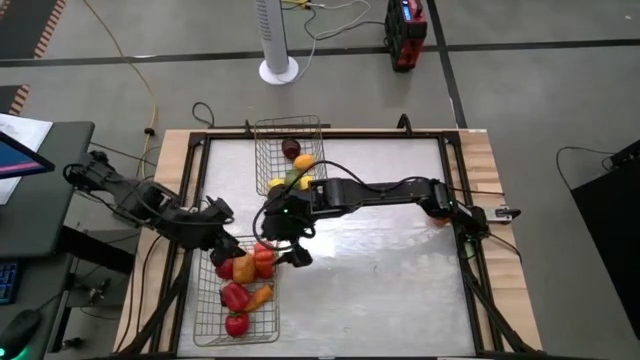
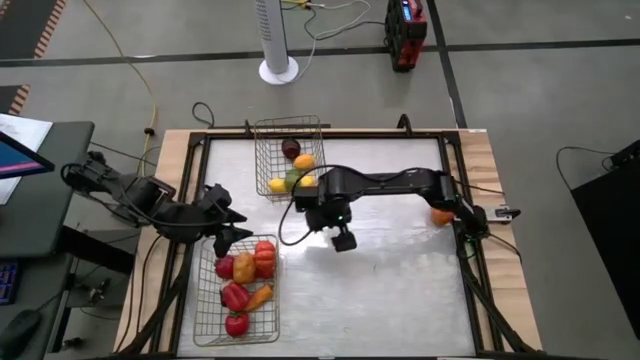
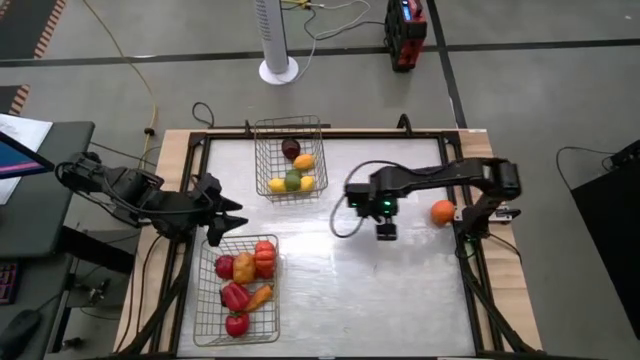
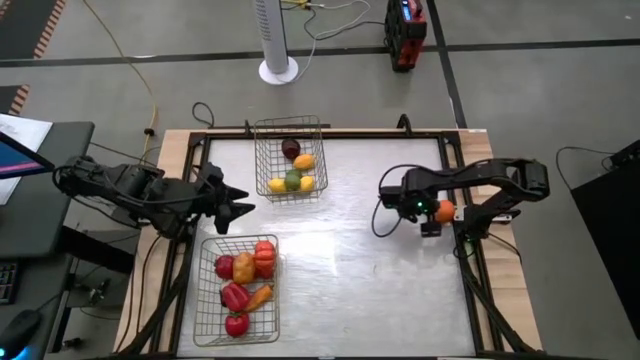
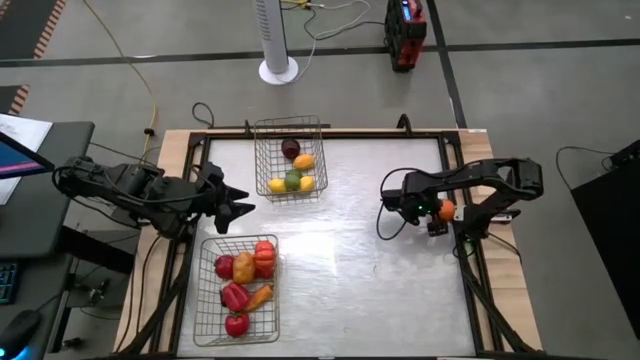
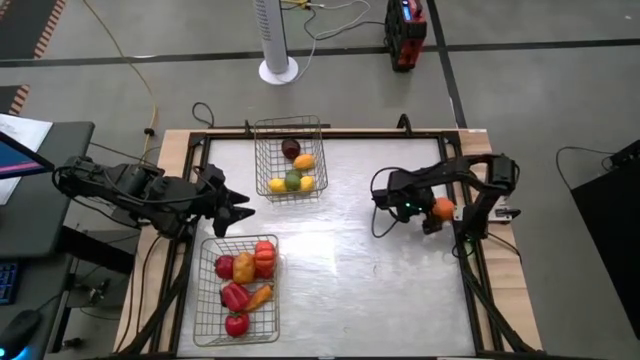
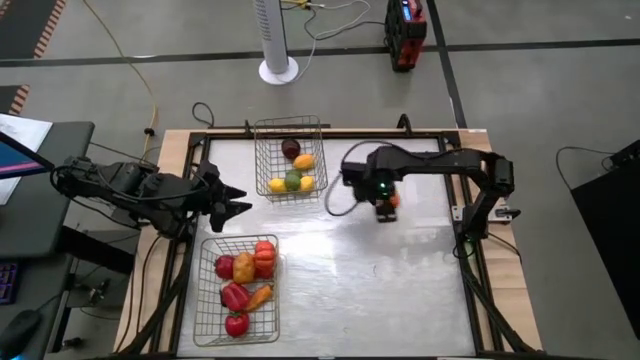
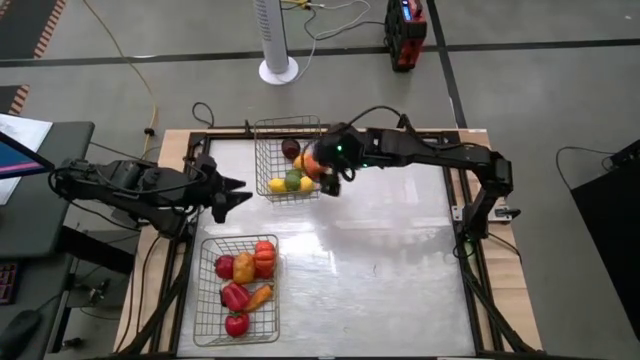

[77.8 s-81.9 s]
Task: Sort produce into baskets
Put the orange into the top wire basket

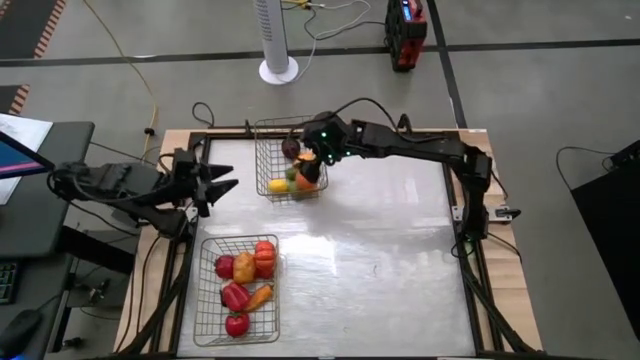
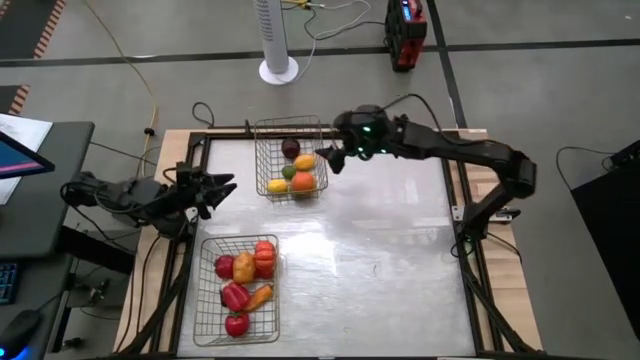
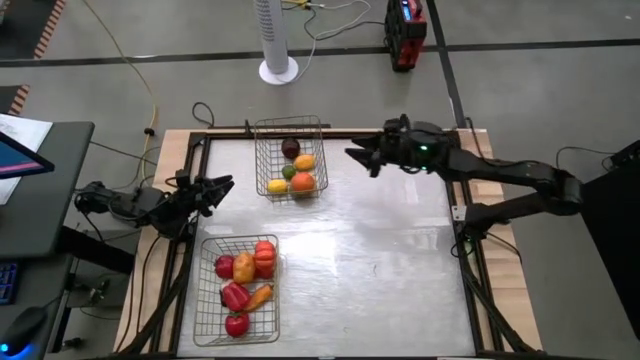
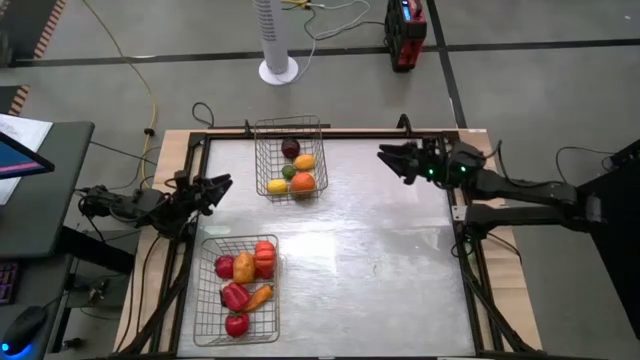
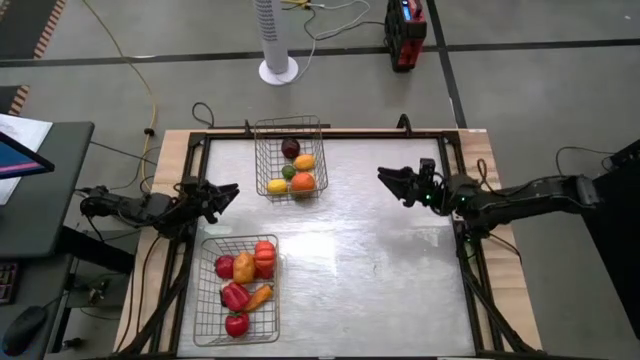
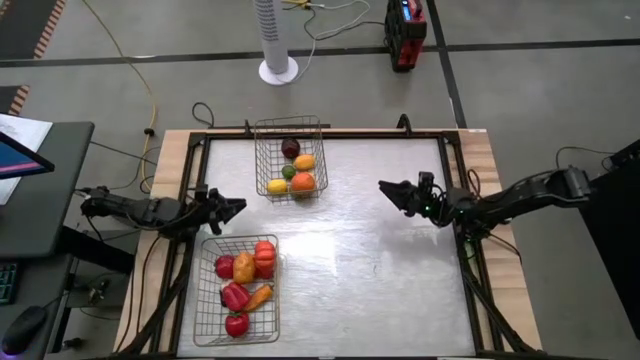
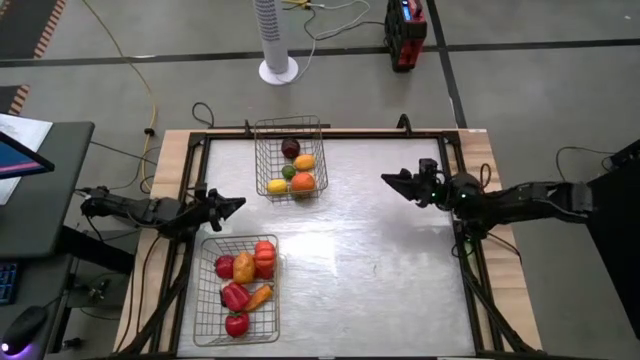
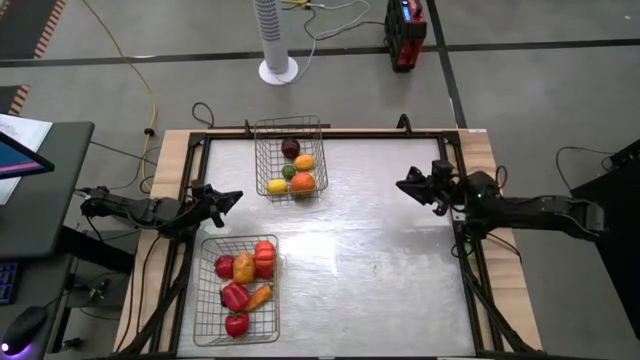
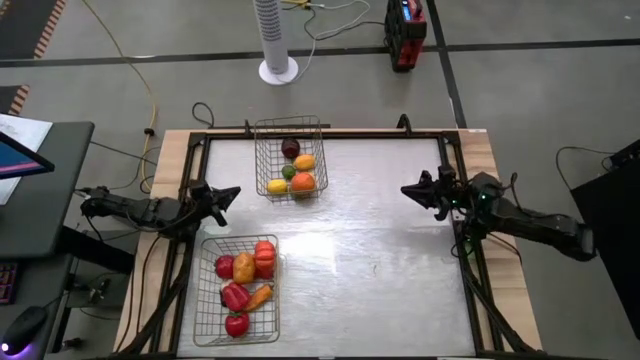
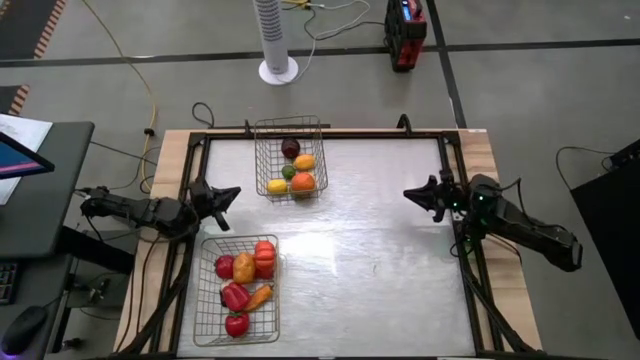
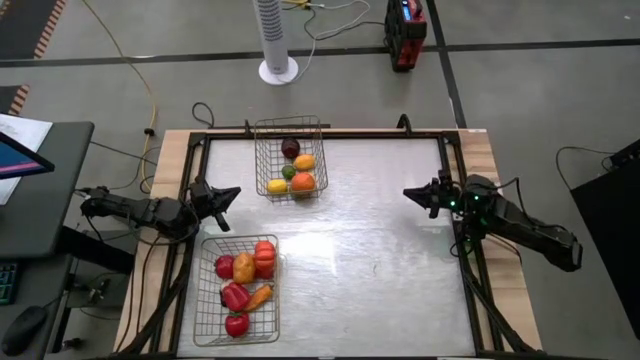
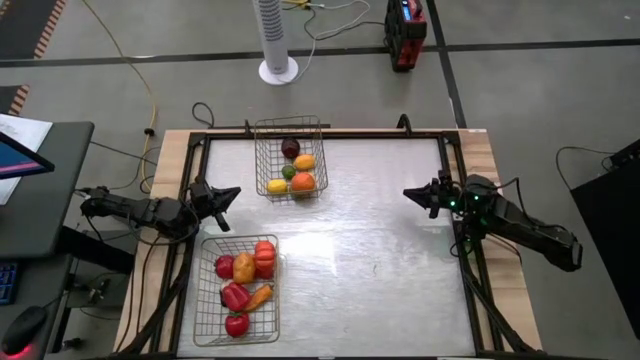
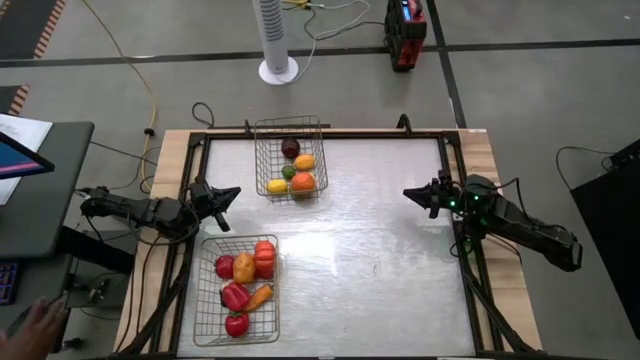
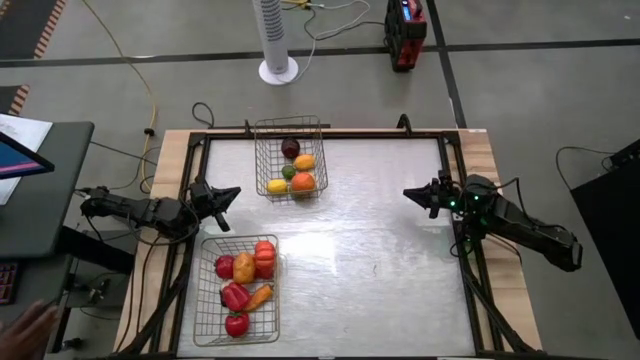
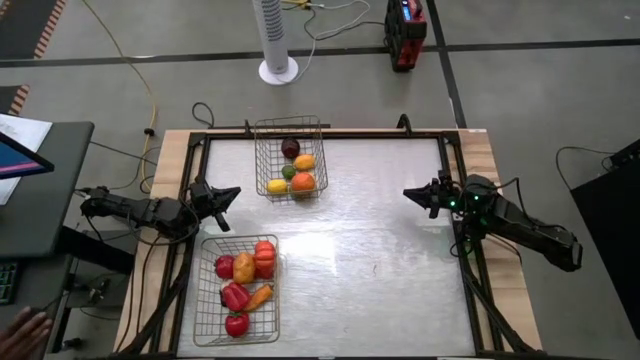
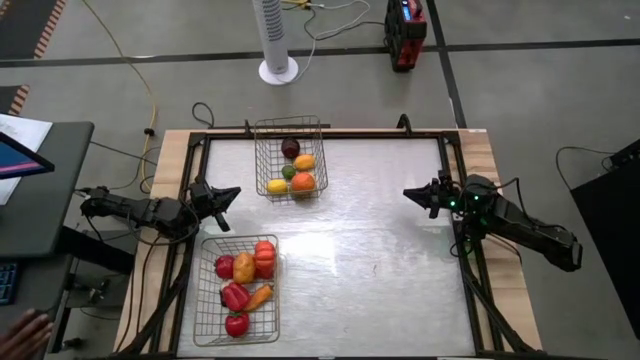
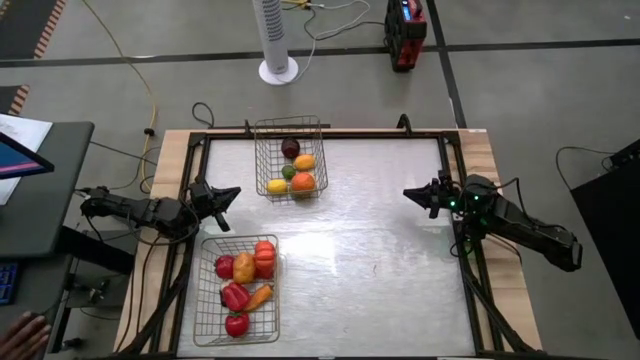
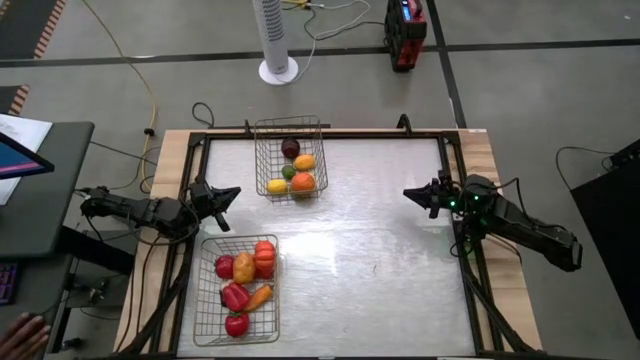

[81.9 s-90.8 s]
Return to Home Position

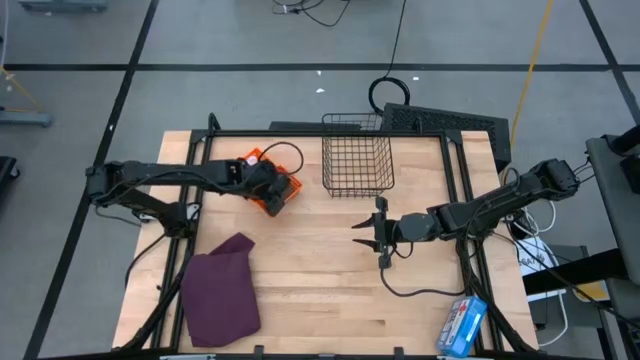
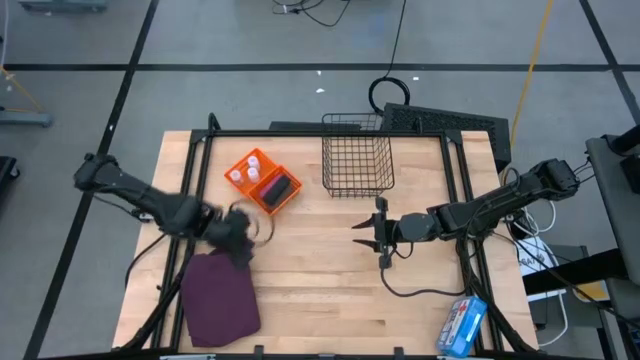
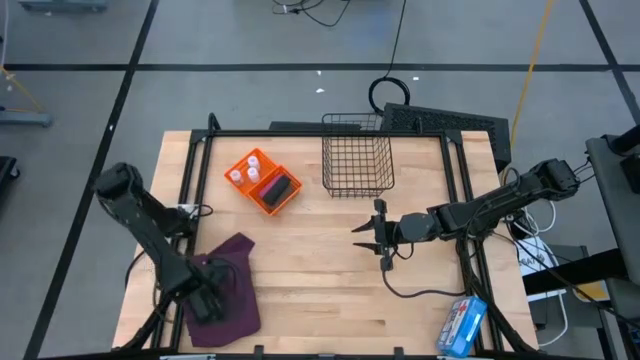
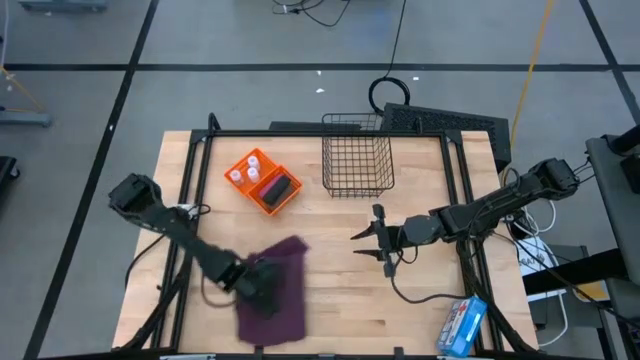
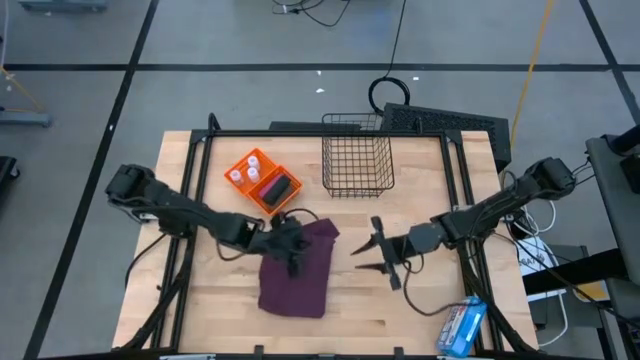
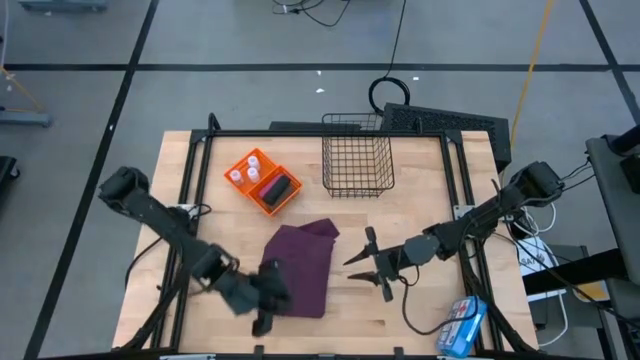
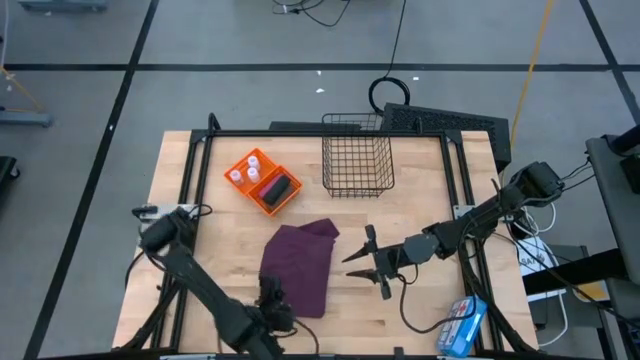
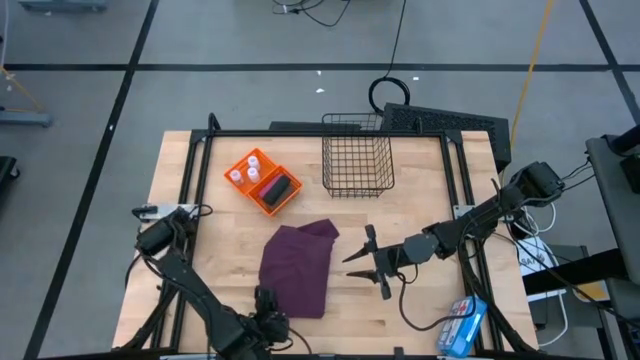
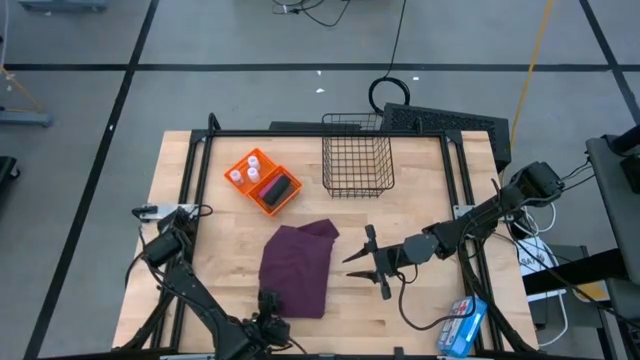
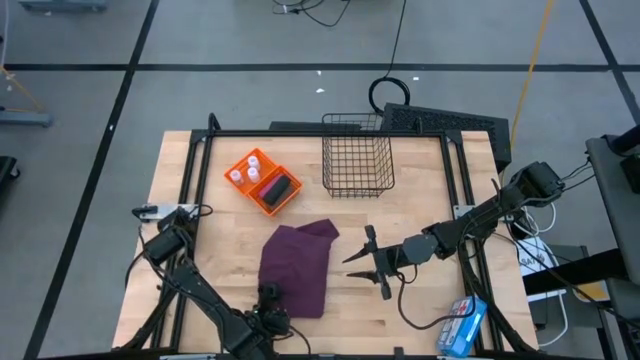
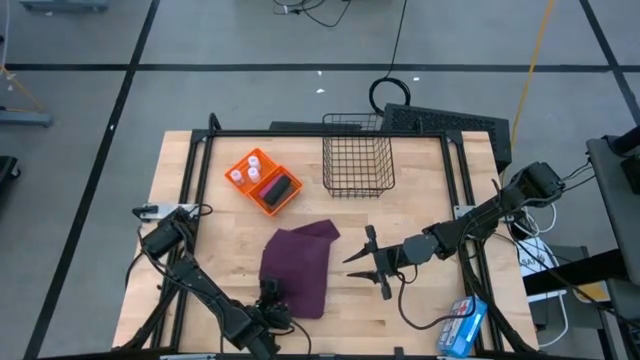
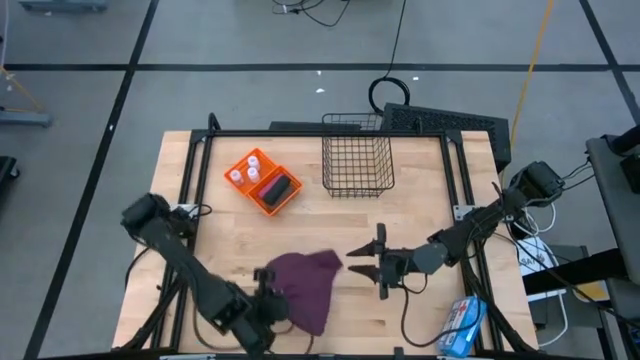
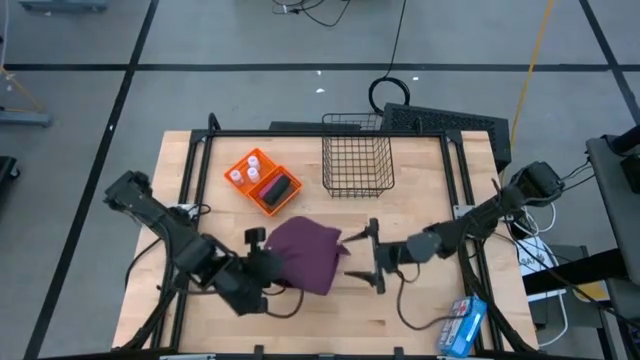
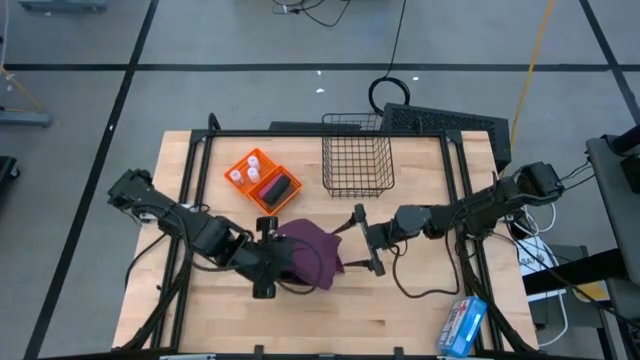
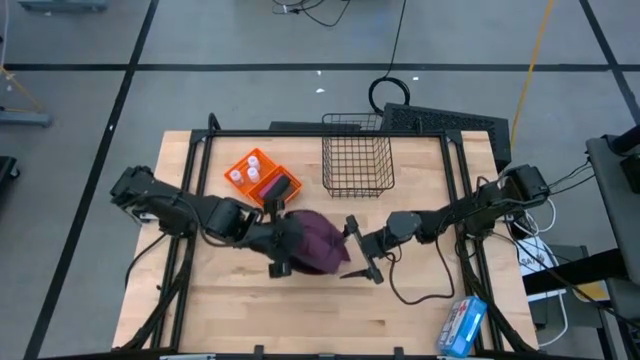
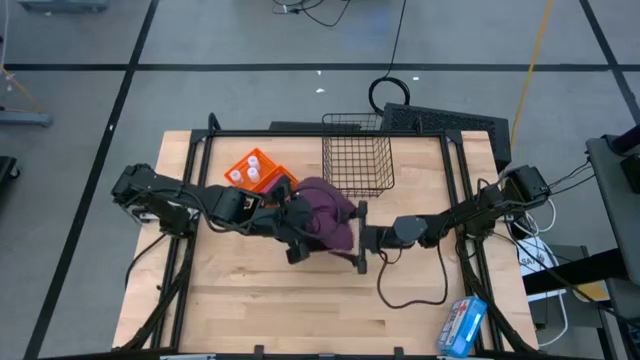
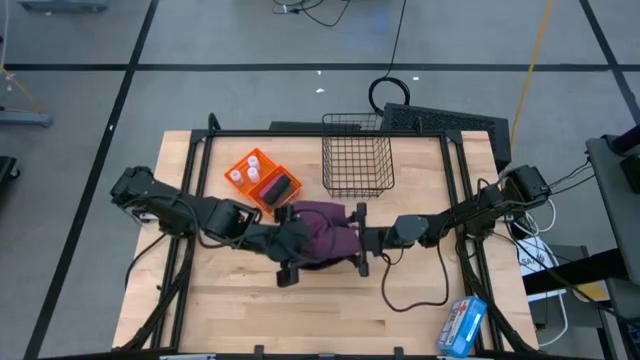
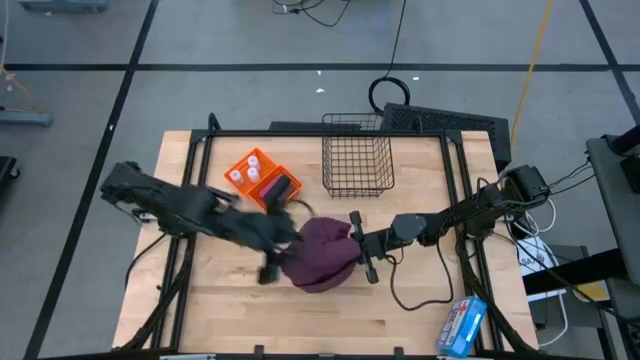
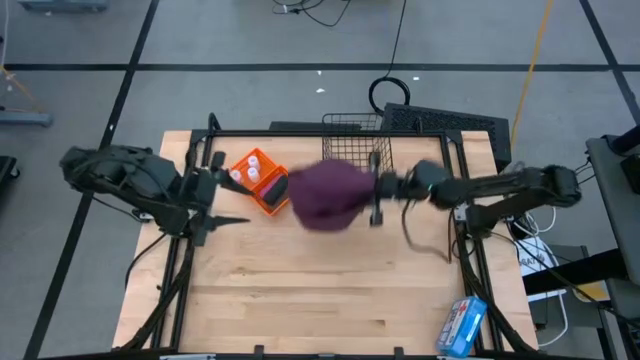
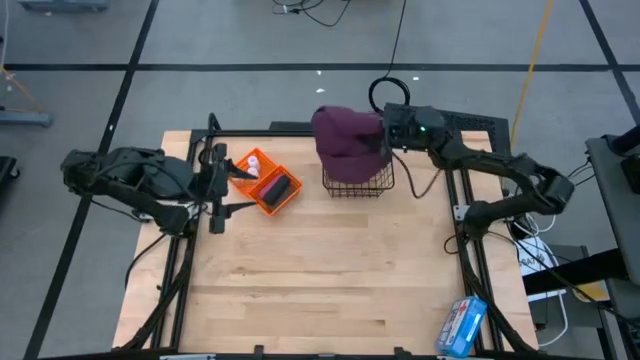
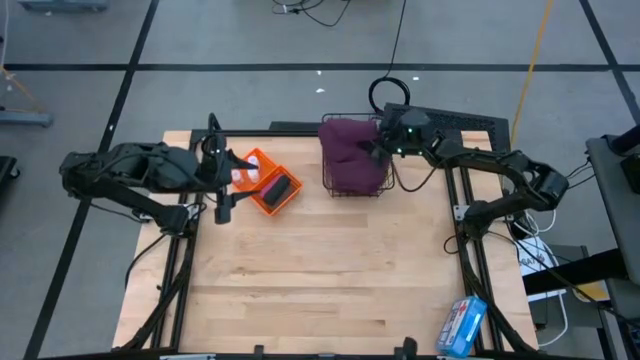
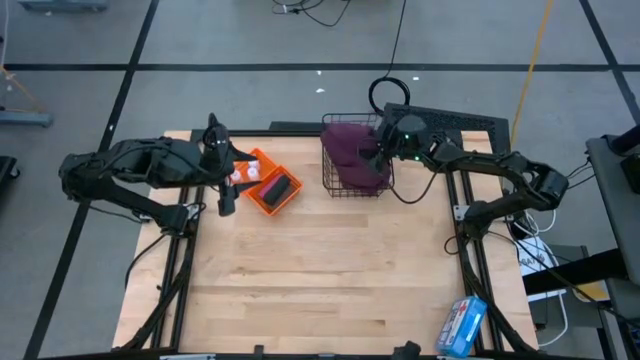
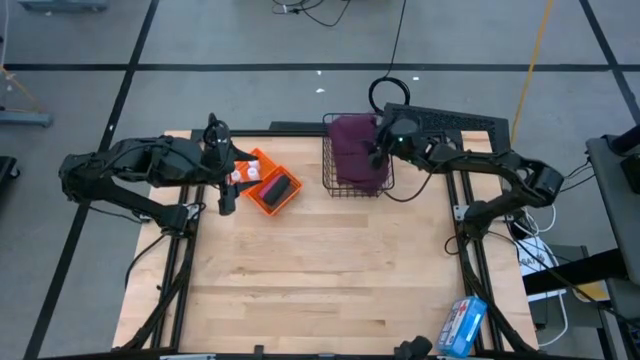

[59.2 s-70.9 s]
Task: Pick & Place Medicine items
Put the purple patient gown into the black mesh basket
